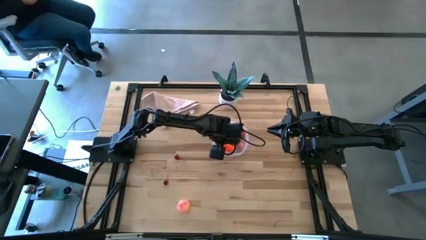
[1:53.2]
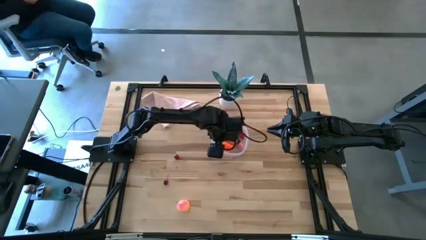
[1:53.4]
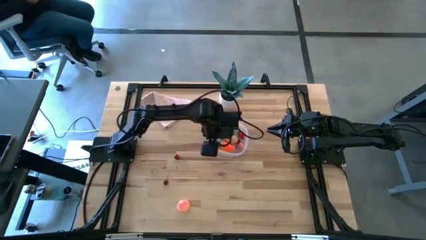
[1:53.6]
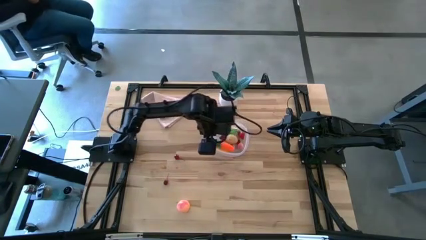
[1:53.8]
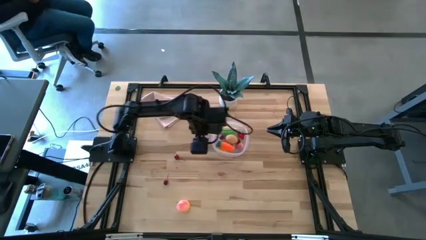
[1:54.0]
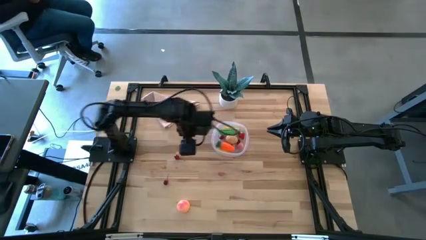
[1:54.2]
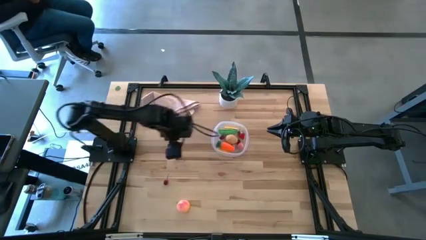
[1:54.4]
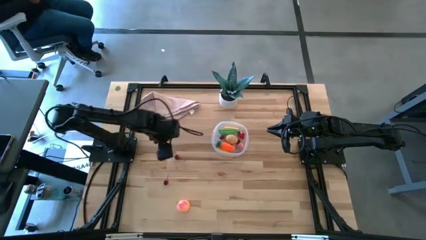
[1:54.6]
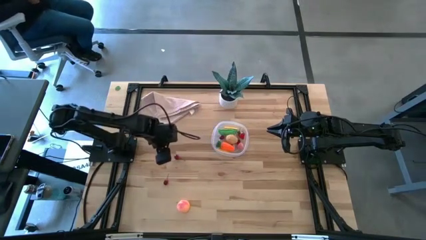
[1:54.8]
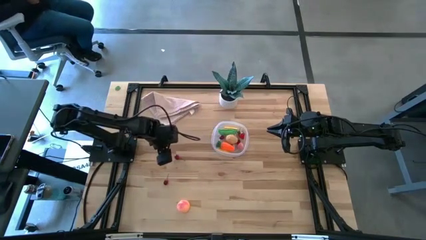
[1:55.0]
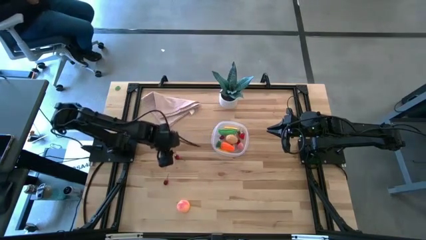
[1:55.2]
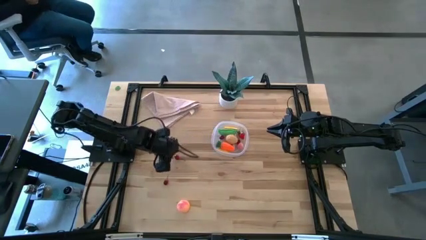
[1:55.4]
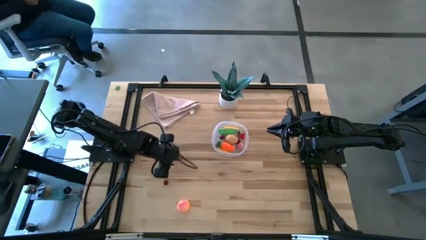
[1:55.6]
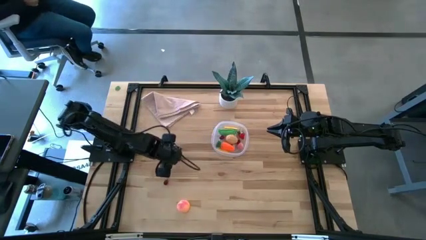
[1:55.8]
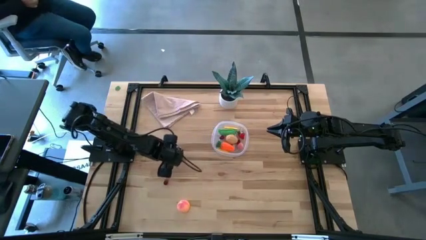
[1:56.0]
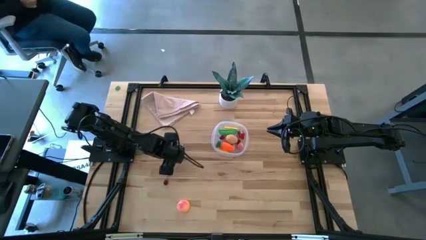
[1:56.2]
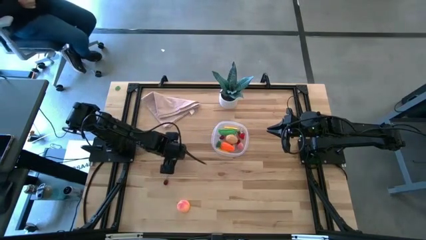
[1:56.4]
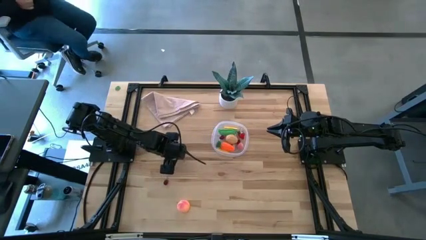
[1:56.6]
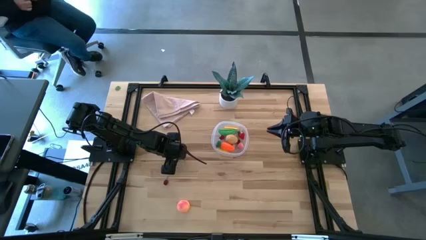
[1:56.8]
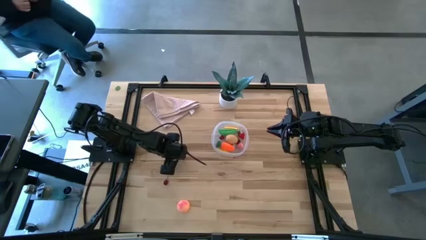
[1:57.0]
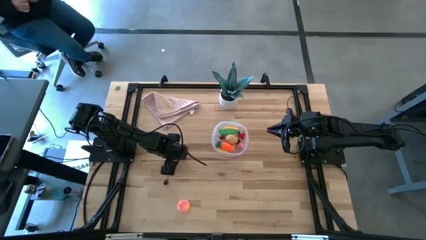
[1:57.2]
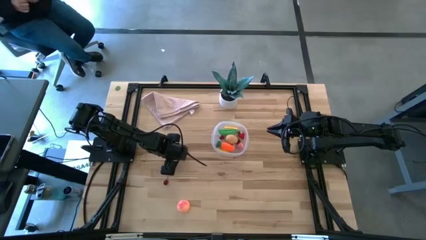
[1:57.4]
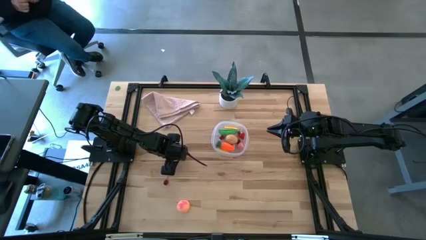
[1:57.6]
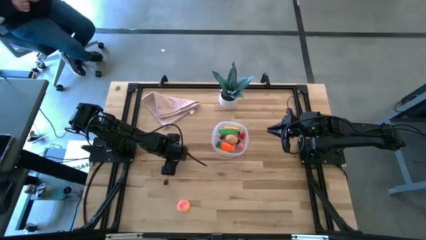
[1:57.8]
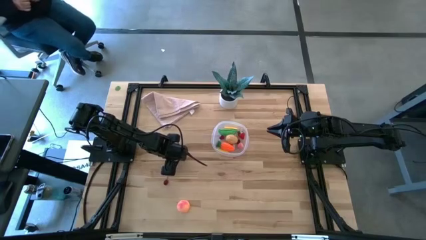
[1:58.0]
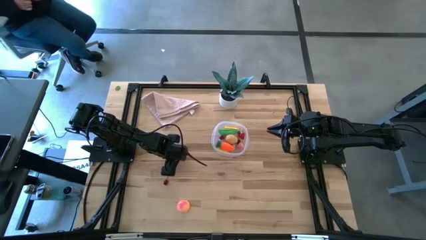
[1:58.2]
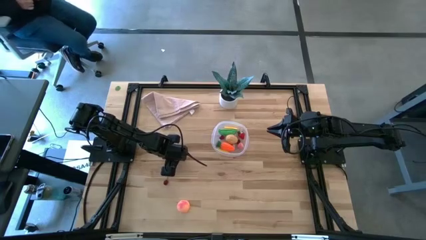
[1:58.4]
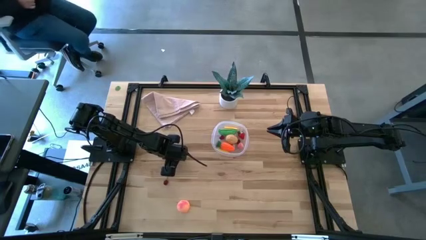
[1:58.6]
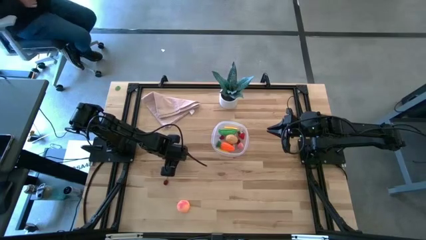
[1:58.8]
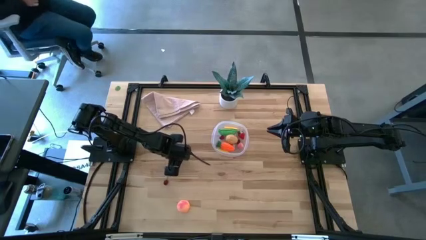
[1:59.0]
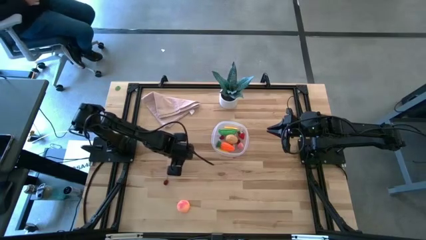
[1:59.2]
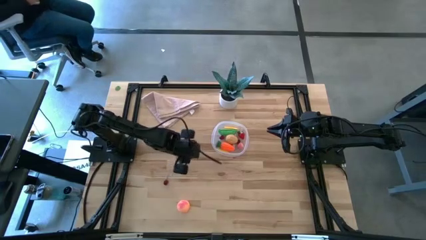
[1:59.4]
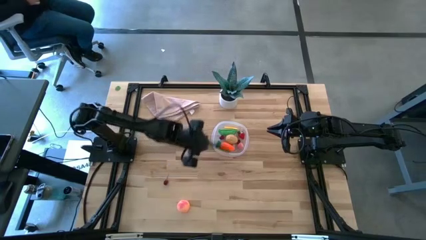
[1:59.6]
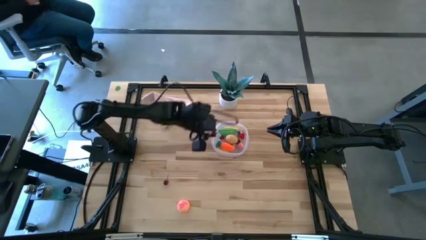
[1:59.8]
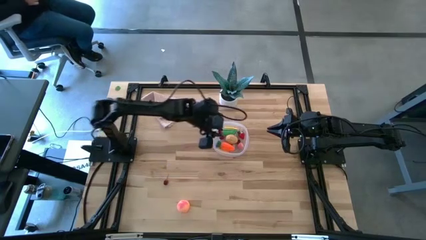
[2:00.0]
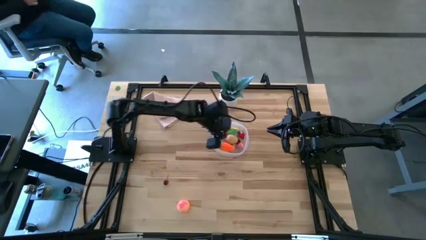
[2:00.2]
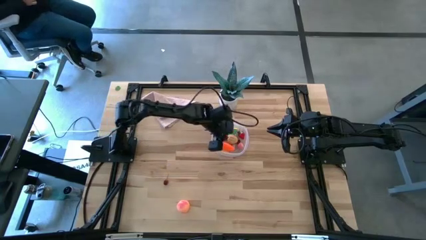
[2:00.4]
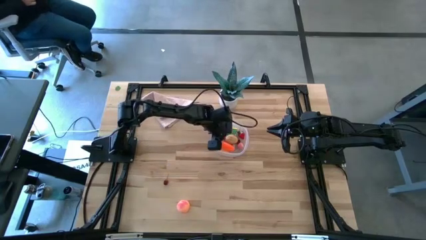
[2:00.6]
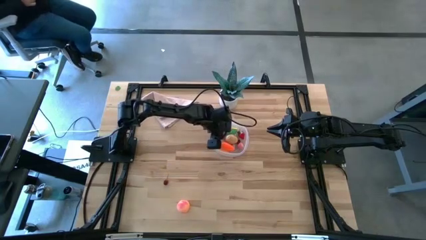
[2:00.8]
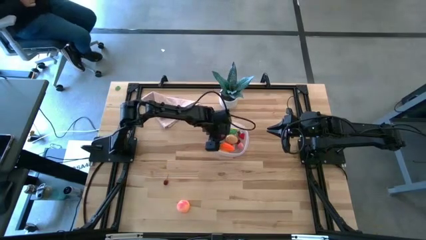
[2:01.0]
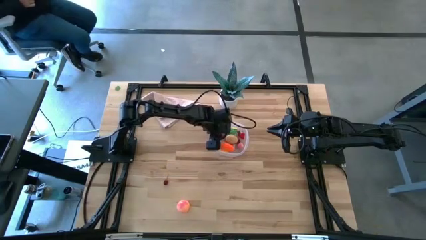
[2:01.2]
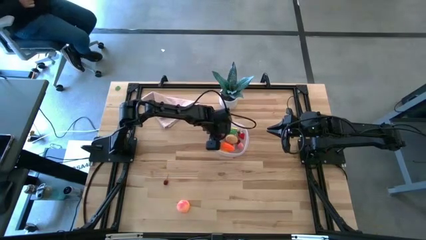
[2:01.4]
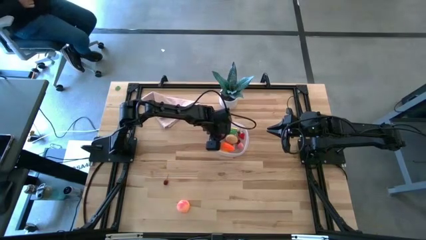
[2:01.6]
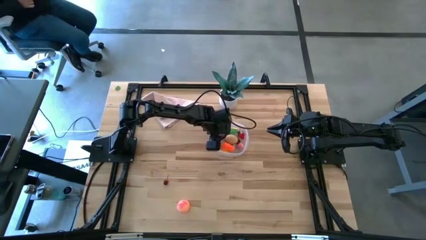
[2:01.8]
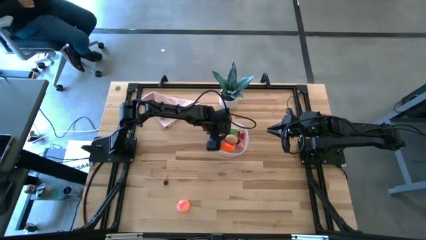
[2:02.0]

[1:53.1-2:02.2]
Task: Pick and placing Produce into tupperware
Put the top cherry into the transparent bin

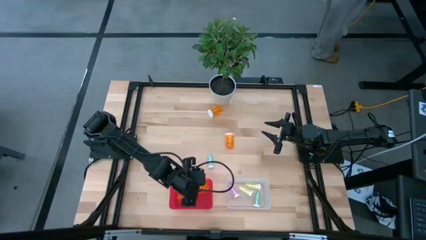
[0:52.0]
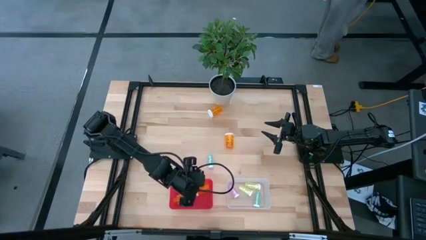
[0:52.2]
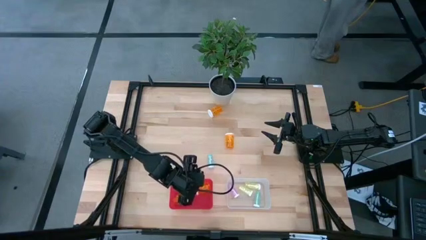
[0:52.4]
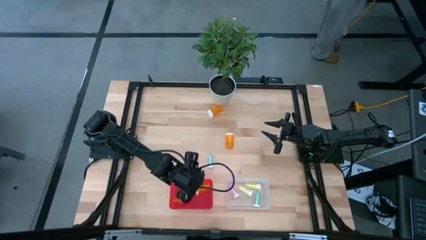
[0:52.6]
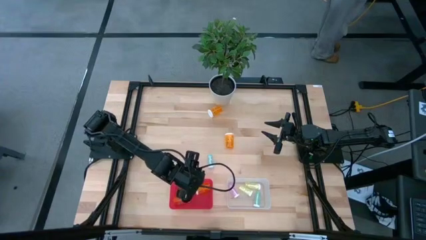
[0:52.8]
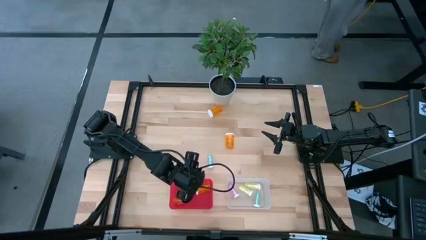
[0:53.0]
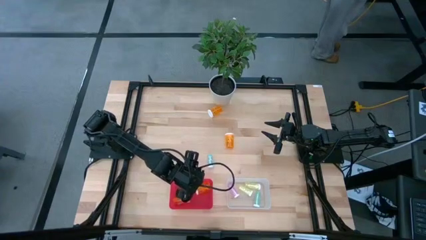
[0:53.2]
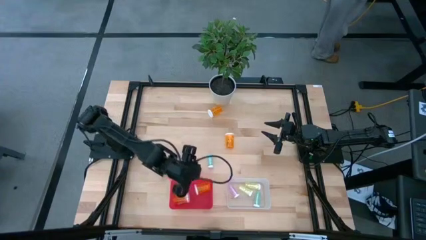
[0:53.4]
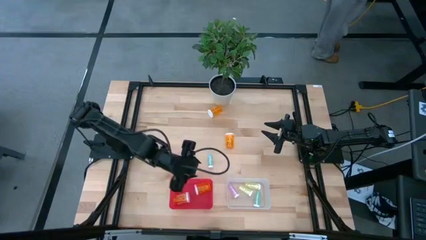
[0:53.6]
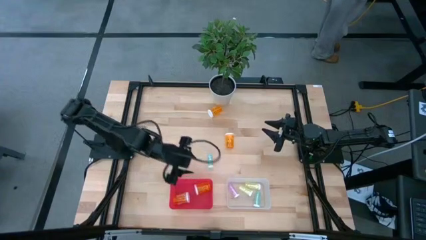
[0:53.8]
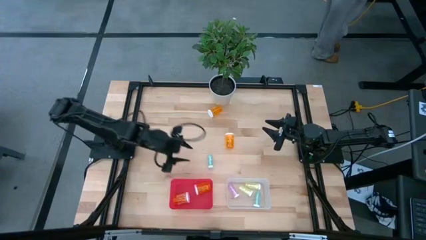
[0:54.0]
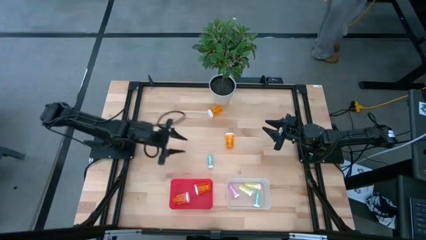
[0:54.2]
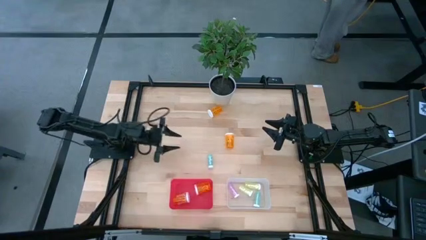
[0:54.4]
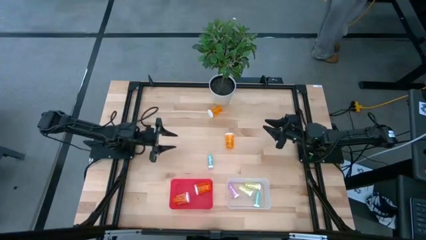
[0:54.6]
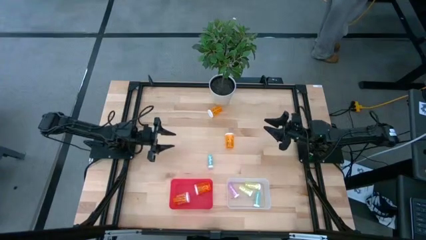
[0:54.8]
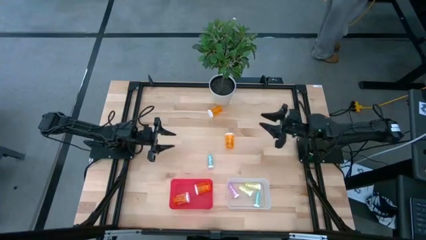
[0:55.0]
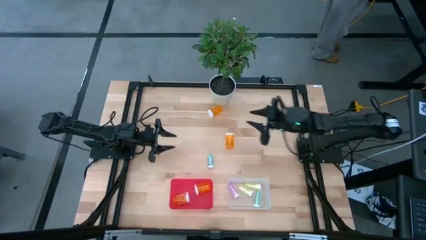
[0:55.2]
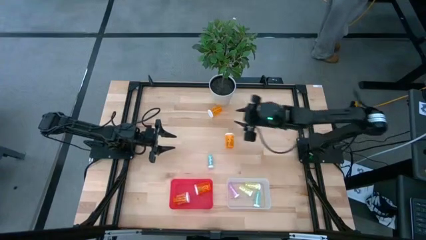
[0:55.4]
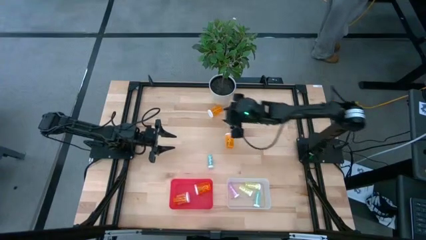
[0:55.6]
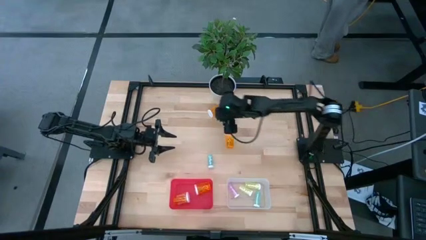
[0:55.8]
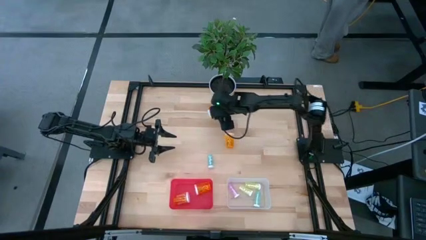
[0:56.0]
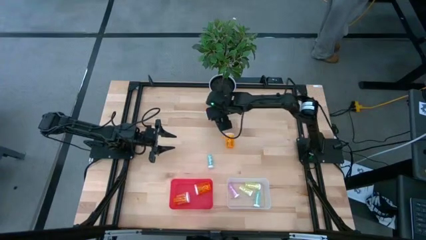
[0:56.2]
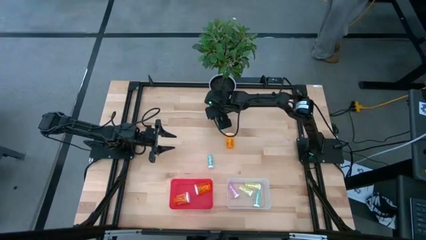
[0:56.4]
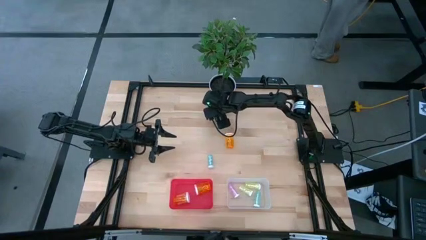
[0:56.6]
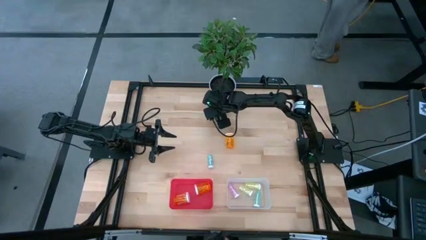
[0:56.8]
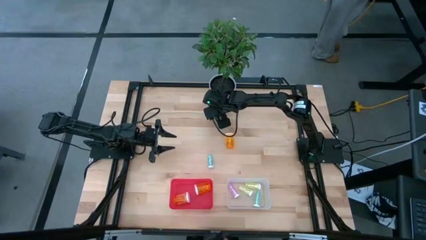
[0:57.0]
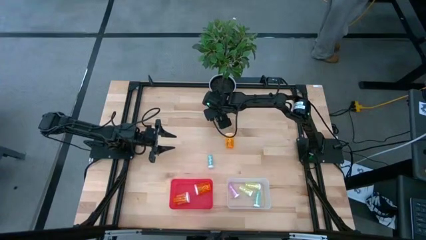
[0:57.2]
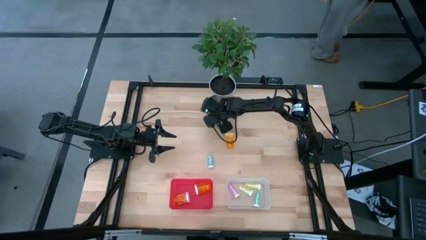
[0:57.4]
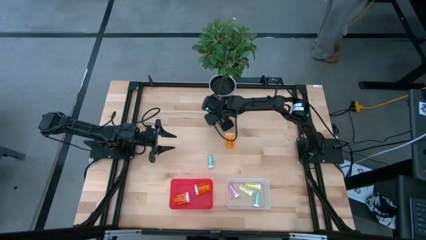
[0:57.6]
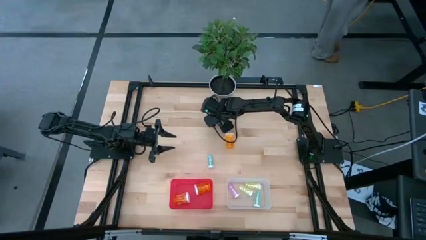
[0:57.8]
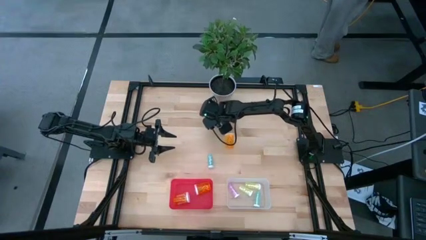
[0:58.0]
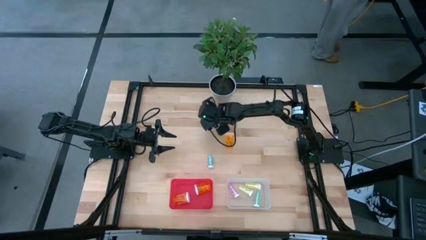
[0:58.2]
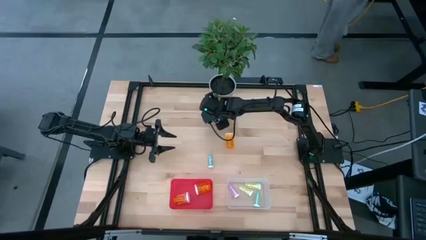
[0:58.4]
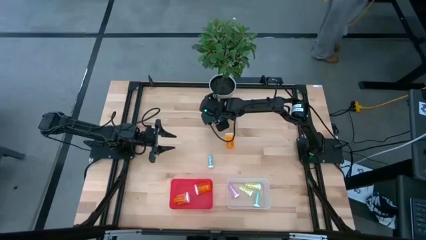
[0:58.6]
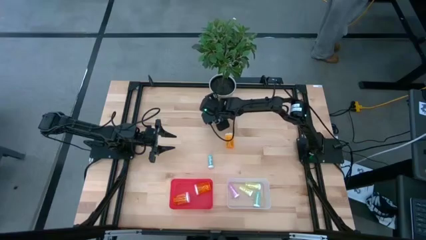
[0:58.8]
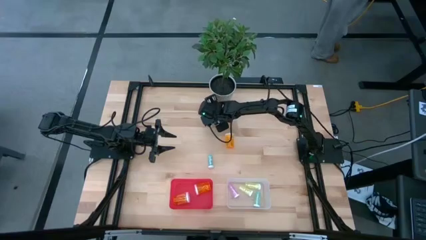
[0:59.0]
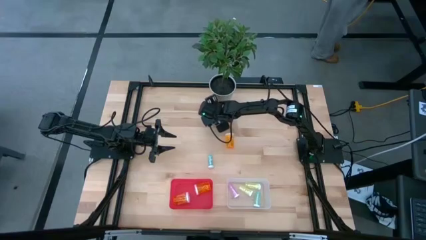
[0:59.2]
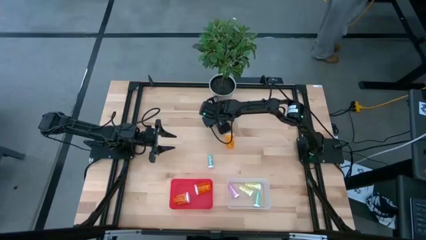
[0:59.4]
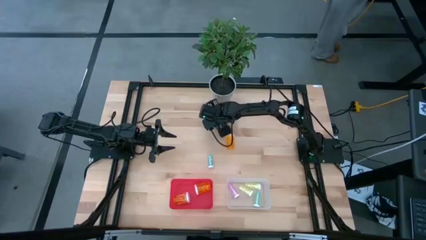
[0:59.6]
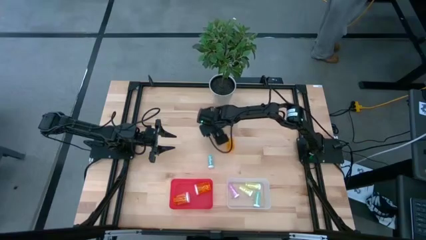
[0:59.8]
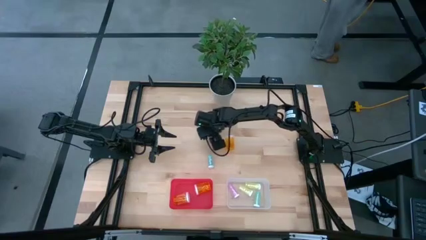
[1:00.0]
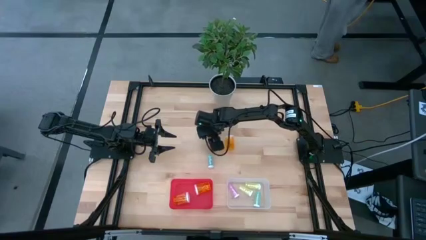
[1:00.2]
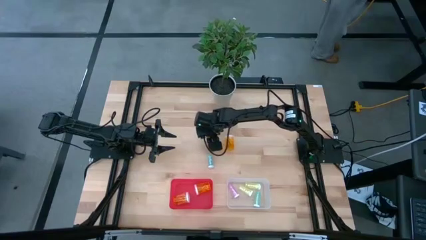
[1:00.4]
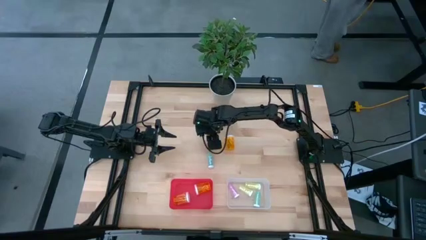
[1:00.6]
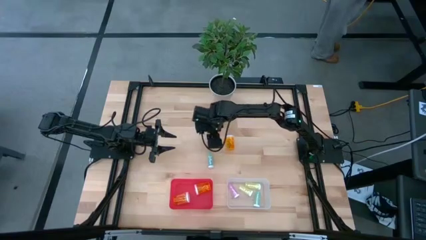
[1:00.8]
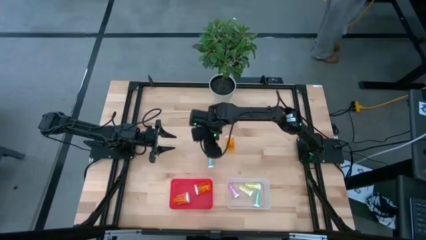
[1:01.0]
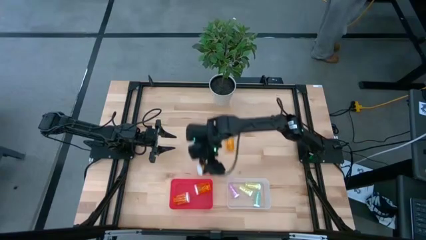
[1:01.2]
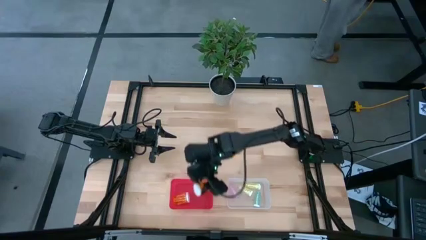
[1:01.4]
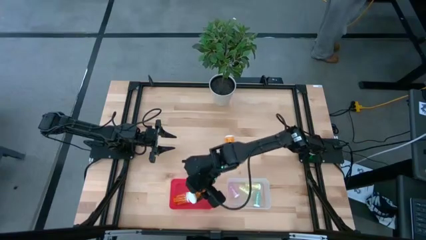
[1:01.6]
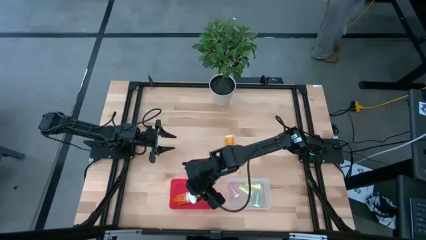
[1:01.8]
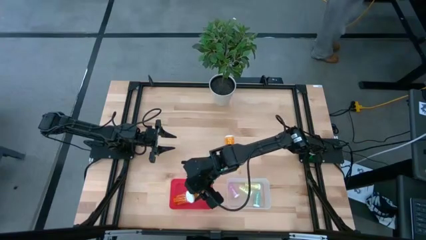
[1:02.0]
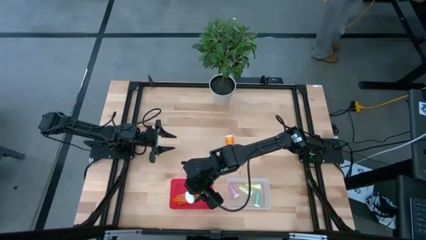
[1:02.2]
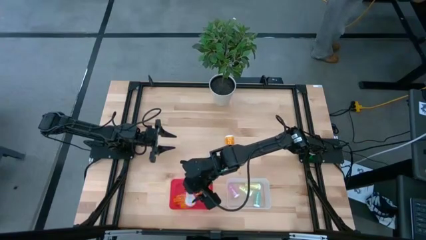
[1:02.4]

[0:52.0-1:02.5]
Task: Pick and place medicine bottles into bin by pill shape (circle, oval)
Put the top large orange pill bottle into the red bin
